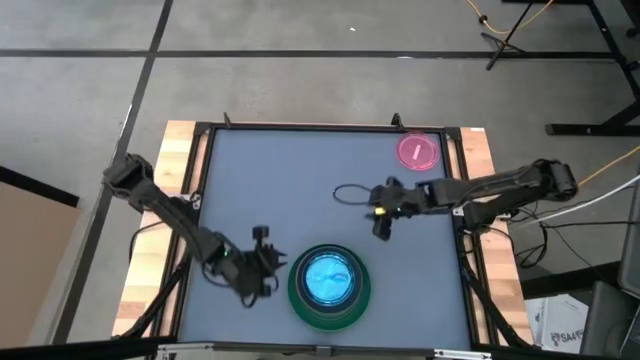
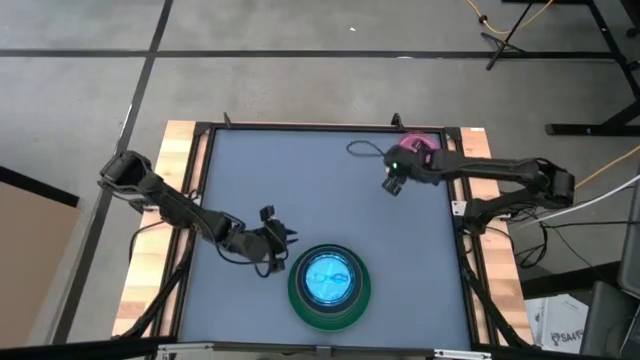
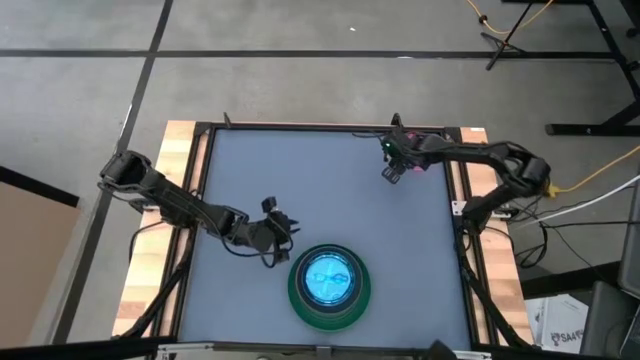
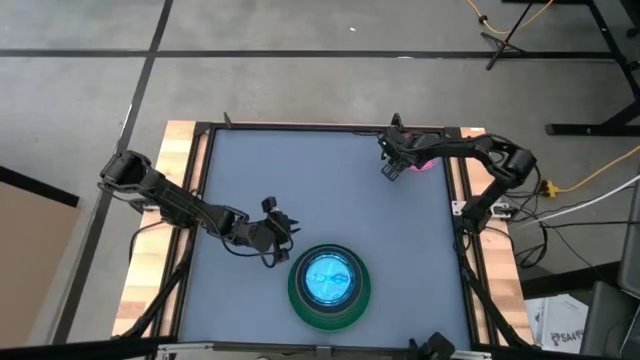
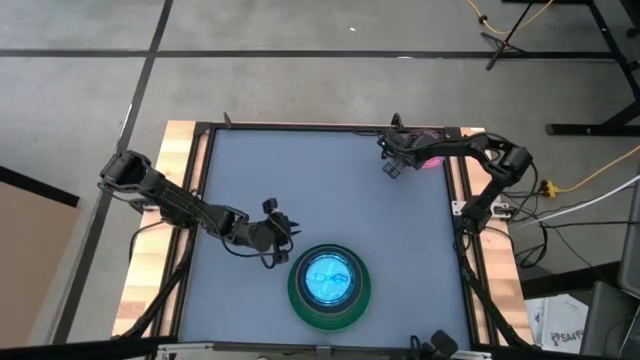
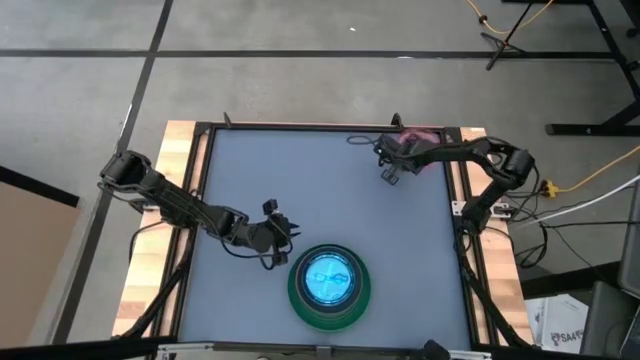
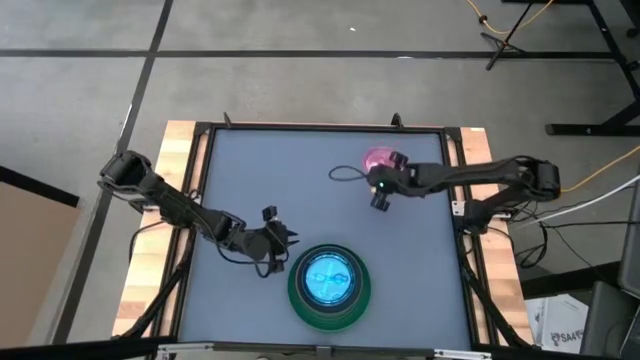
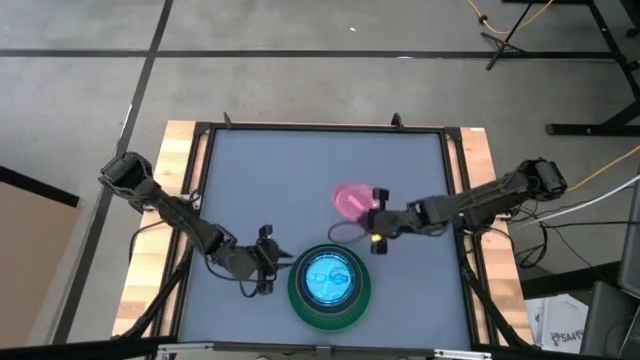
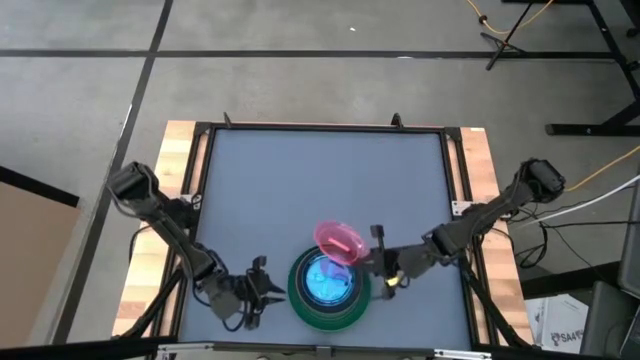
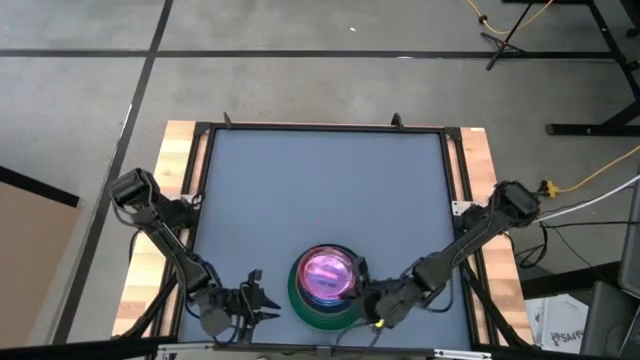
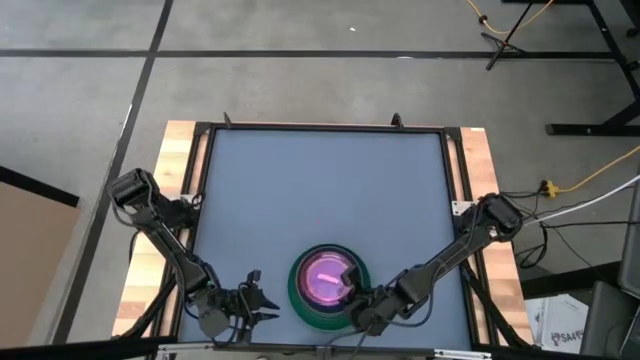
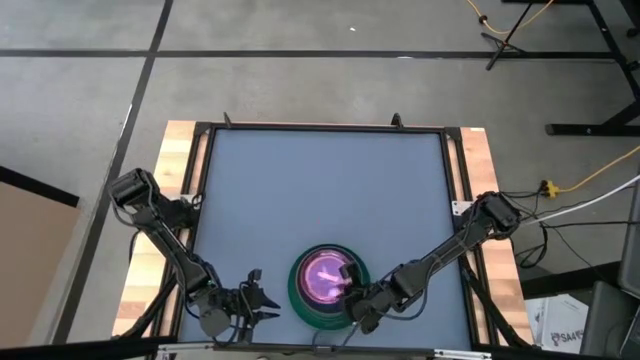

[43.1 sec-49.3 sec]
Task: Stack plastic plates
Stack the pink plate on top of the blue plate

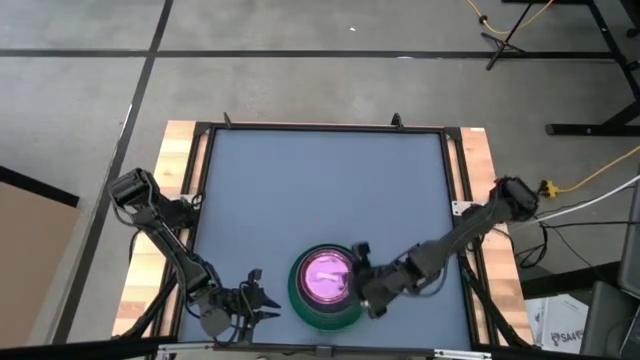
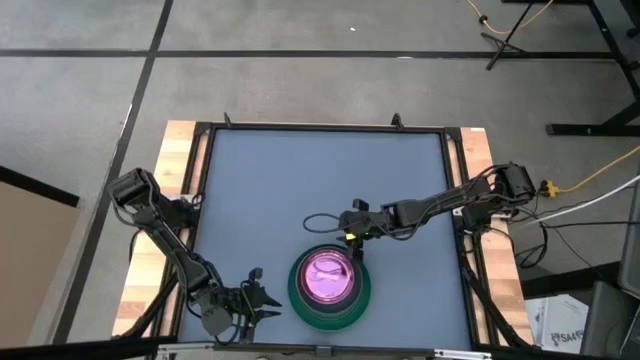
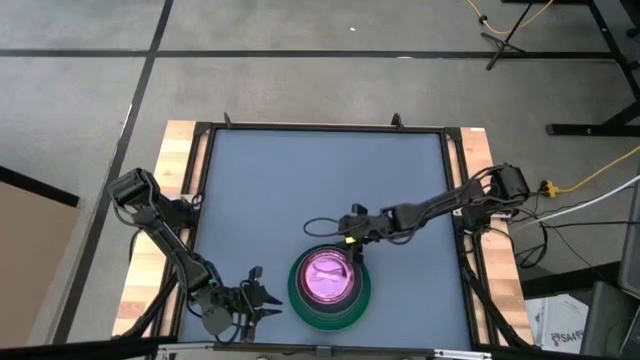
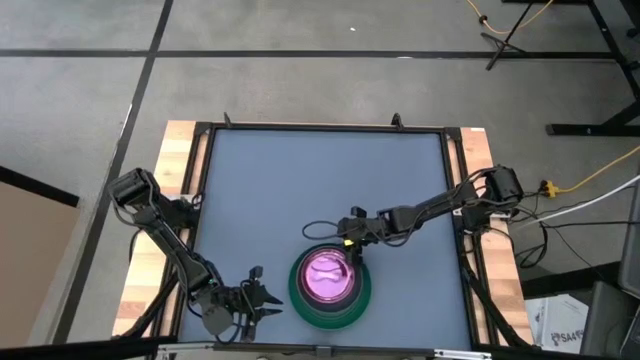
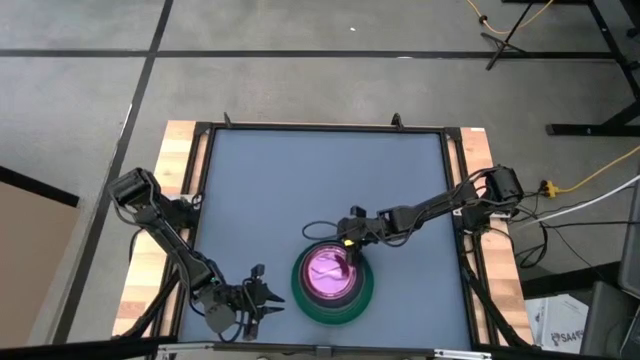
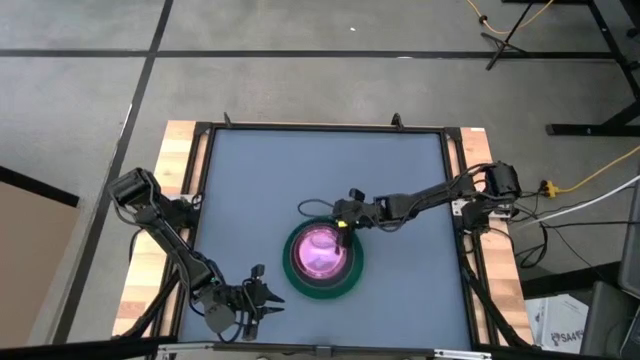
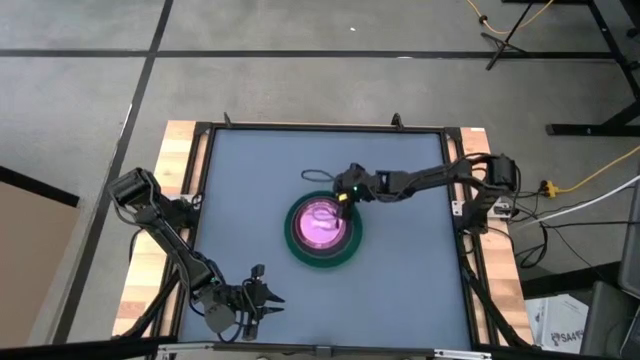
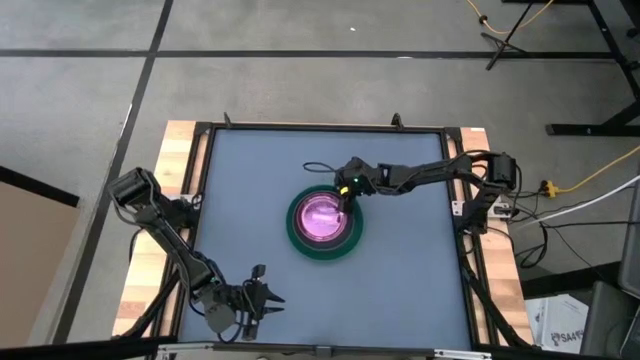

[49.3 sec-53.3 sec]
Move the stack of plates to the center of the table

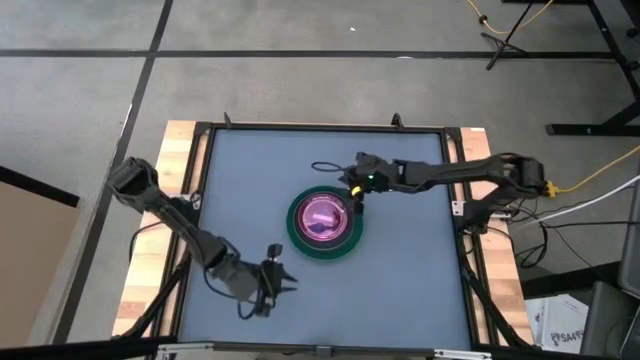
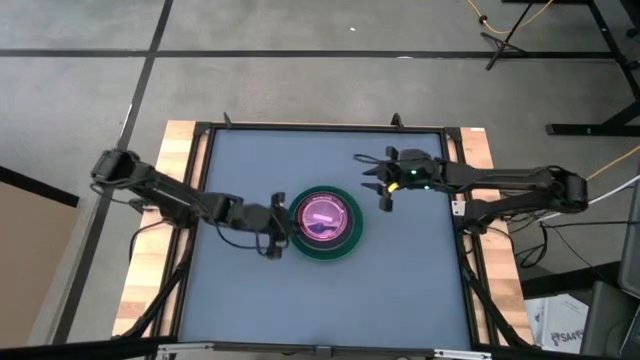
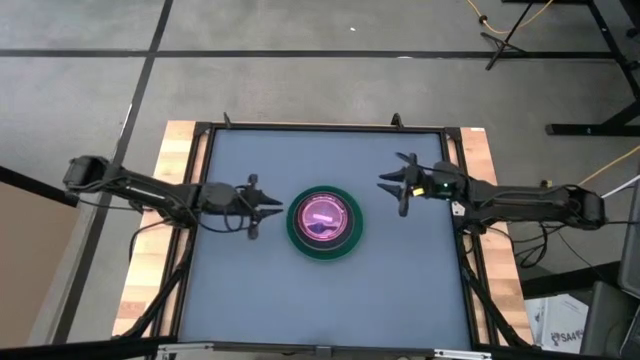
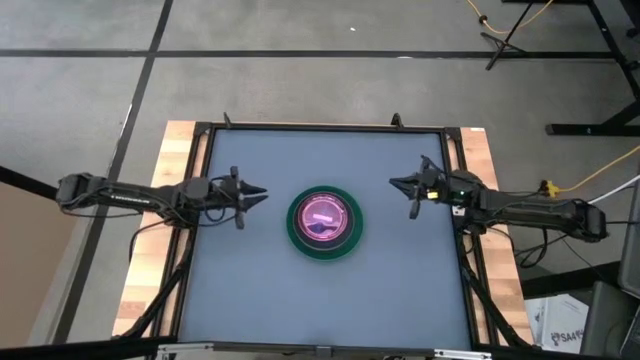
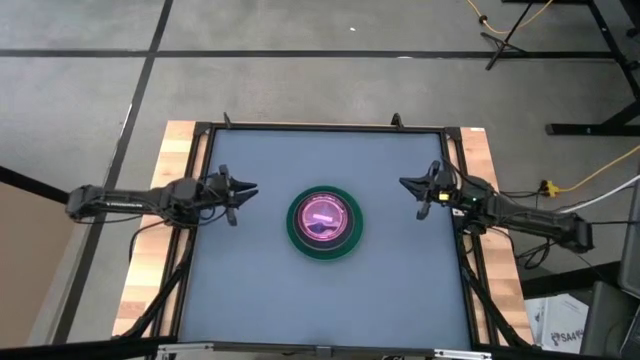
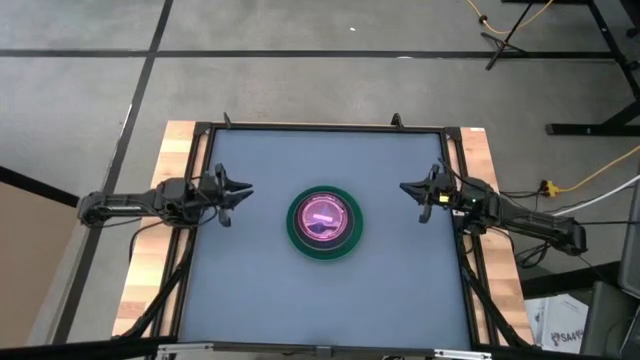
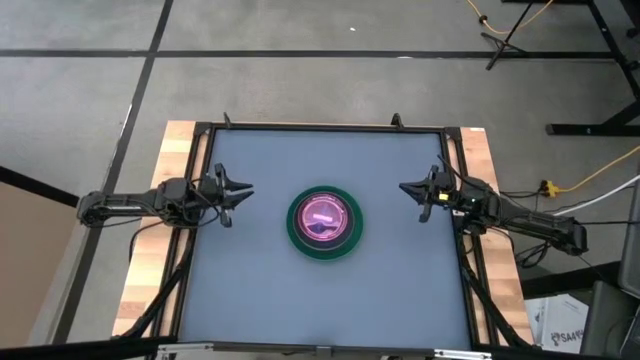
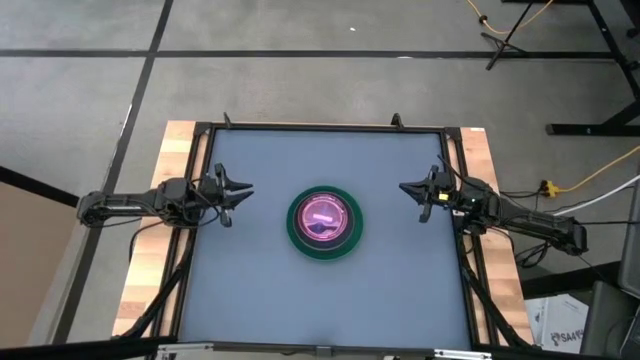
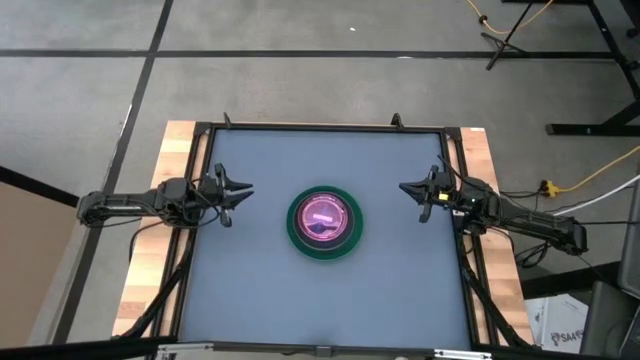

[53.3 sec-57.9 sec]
Return to Home Position

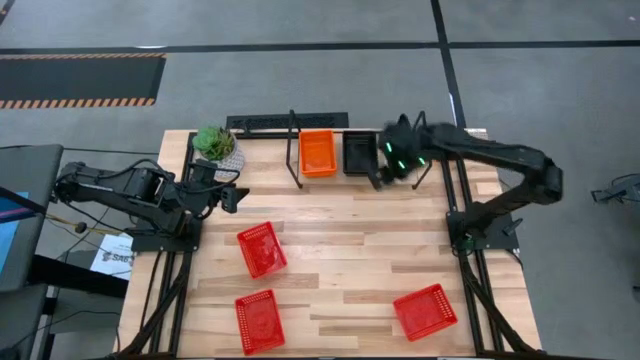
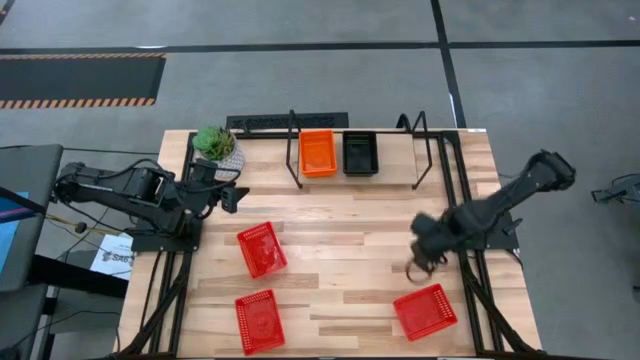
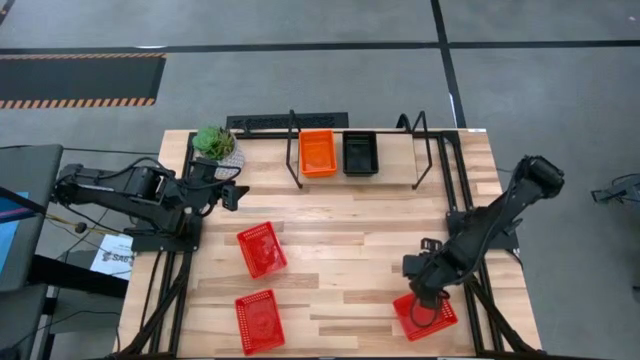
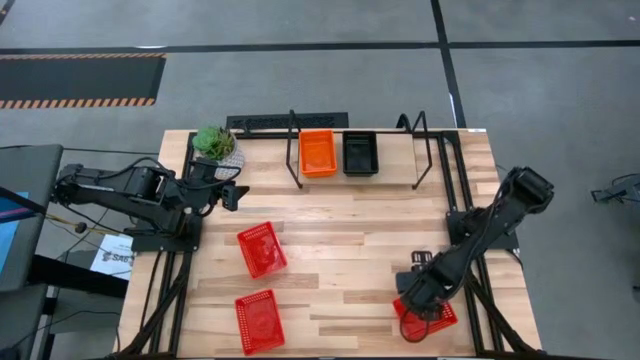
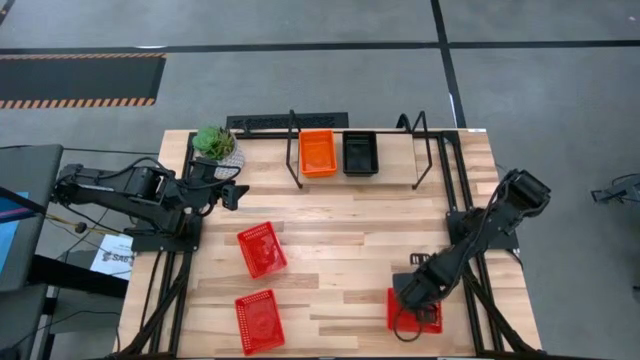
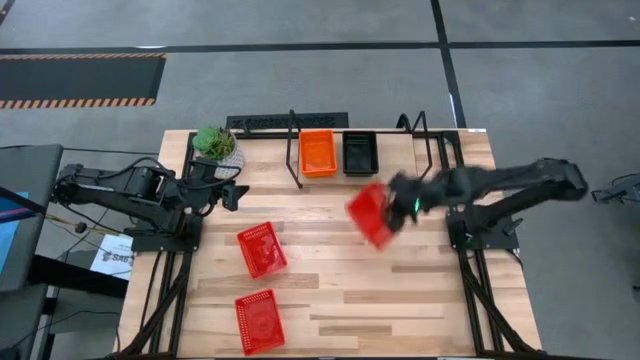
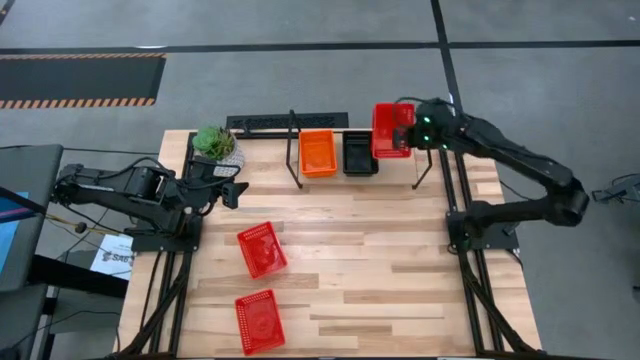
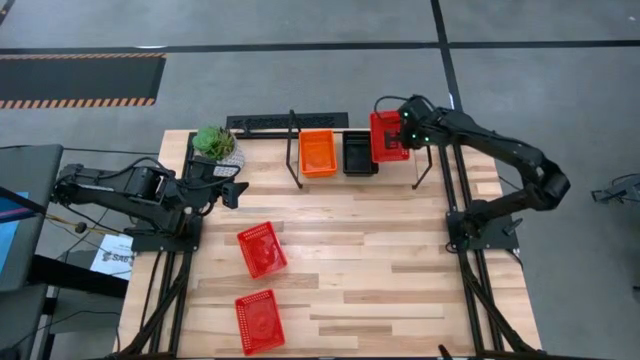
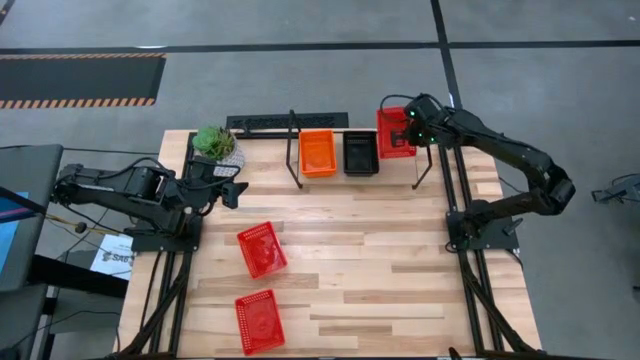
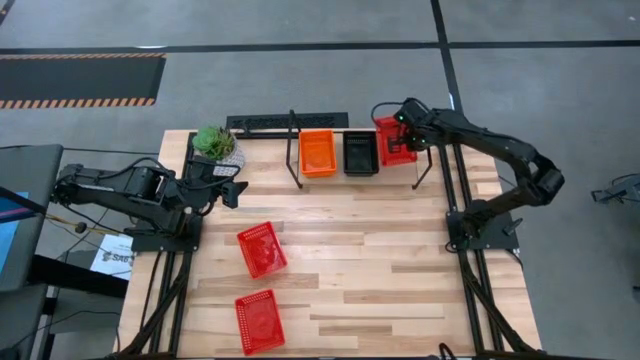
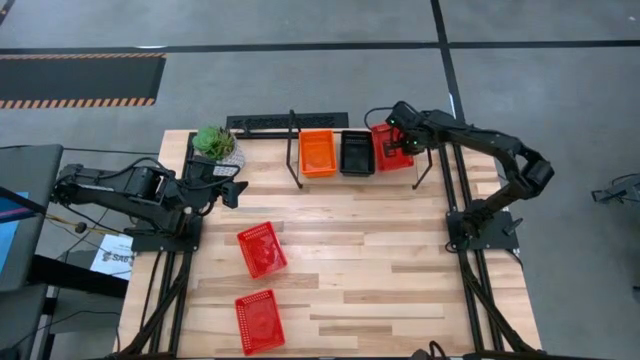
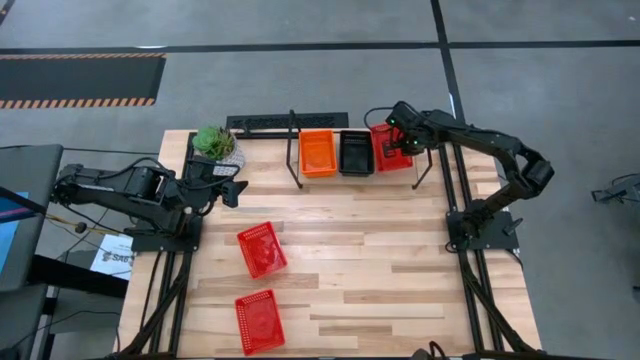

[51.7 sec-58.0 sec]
Task: Stack baskets on shelf by color
Put the bottom right red bin on the shelf
